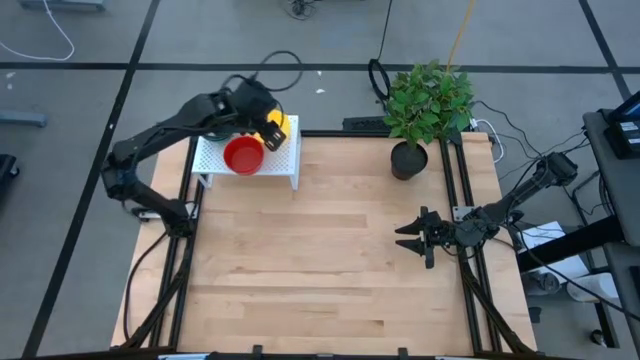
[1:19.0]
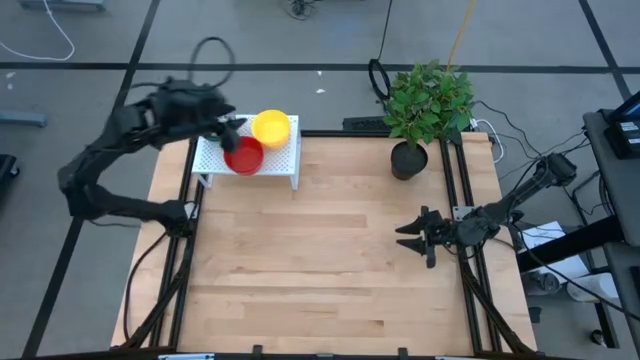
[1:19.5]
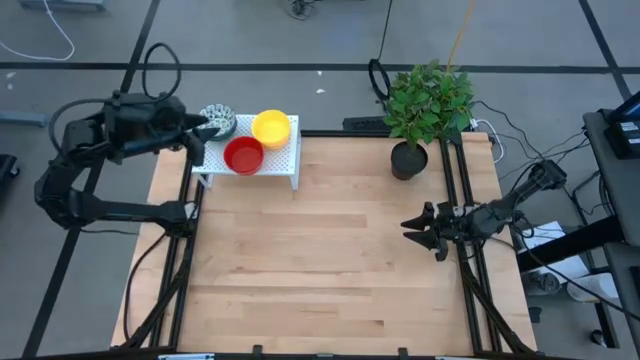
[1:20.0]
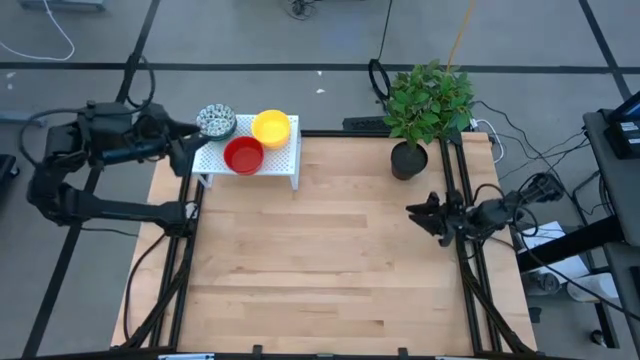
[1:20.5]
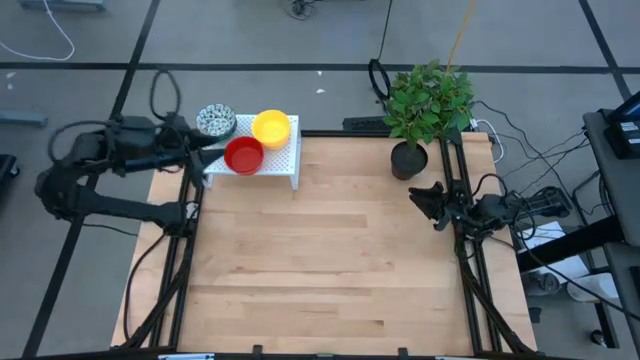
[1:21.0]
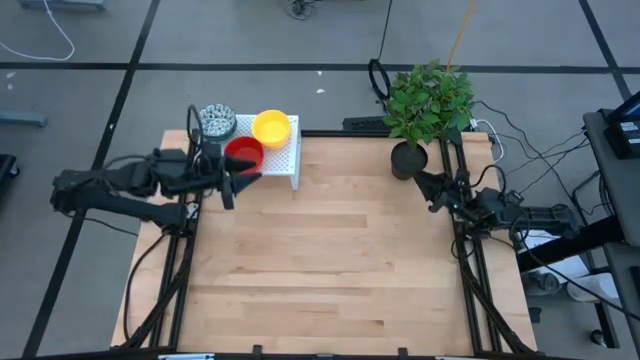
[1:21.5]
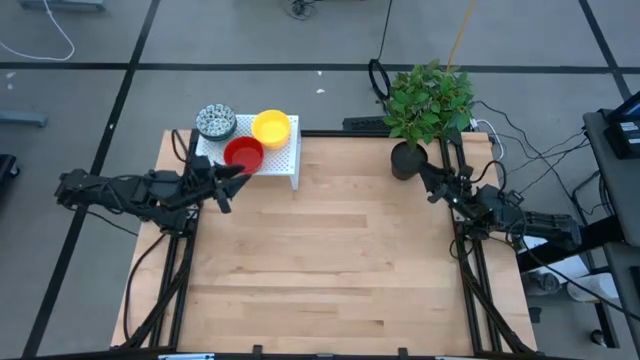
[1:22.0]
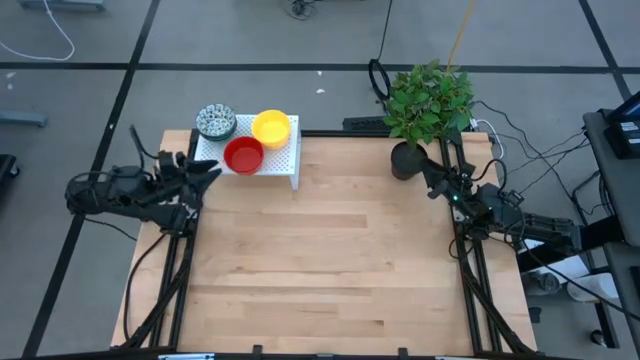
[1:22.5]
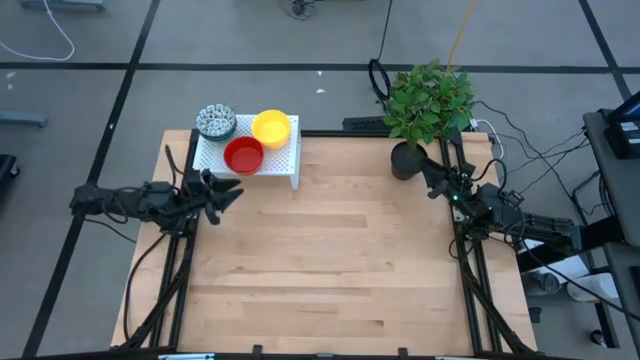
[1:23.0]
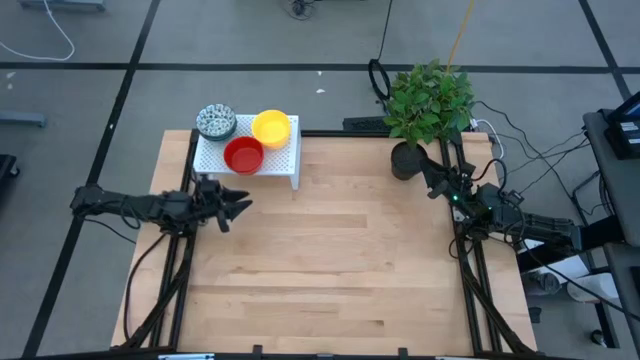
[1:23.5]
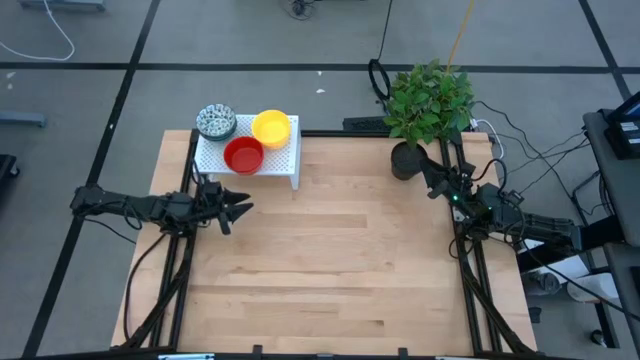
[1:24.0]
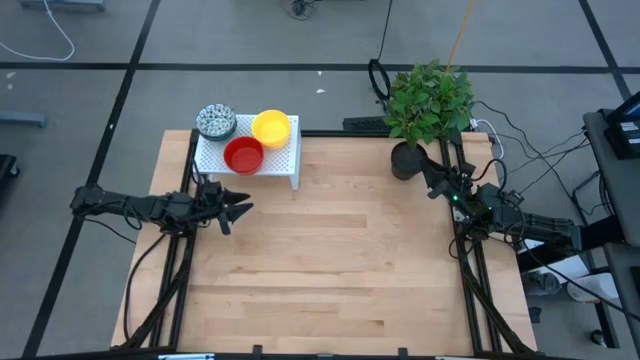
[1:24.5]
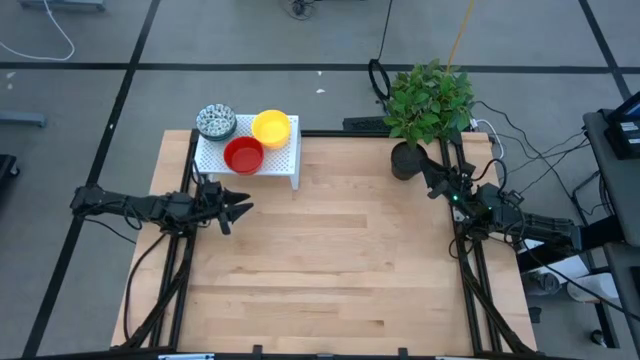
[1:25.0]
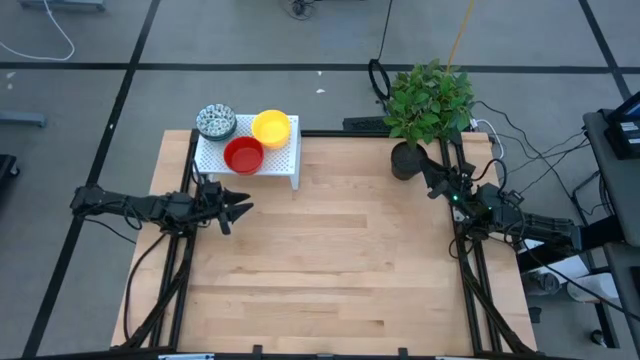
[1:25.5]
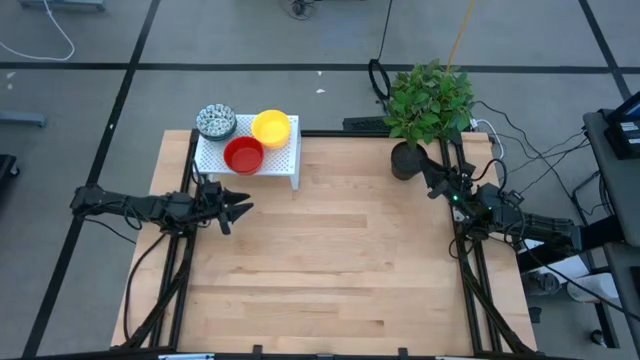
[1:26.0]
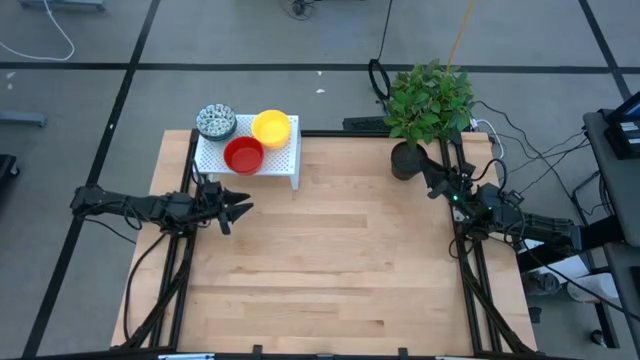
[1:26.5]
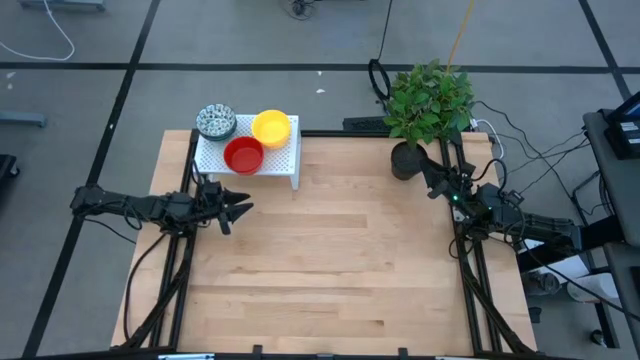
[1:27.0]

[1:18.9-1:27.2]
Task: Pick & Place Mini bowls
Return to Home Position

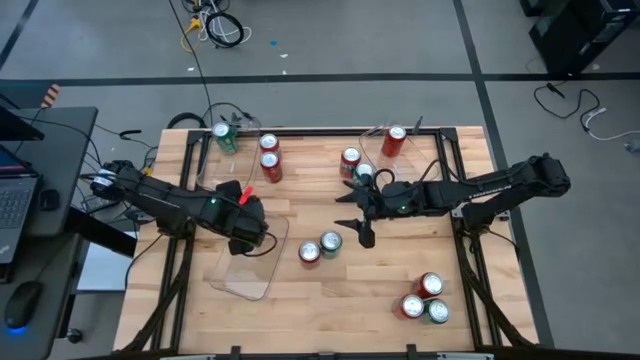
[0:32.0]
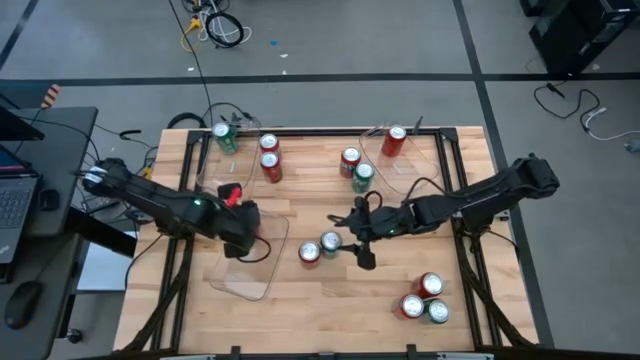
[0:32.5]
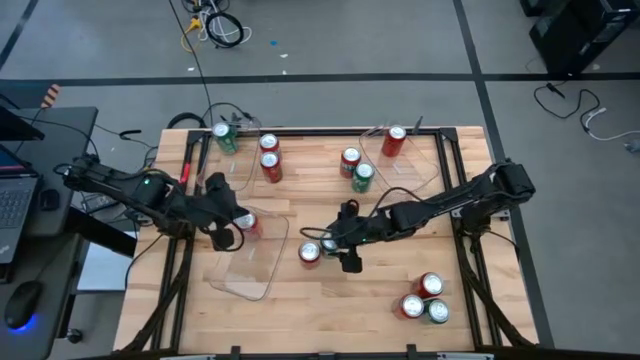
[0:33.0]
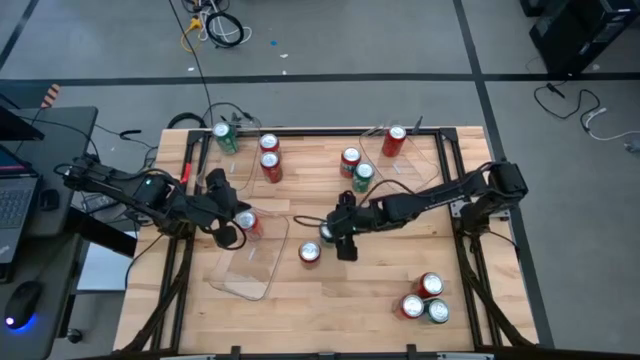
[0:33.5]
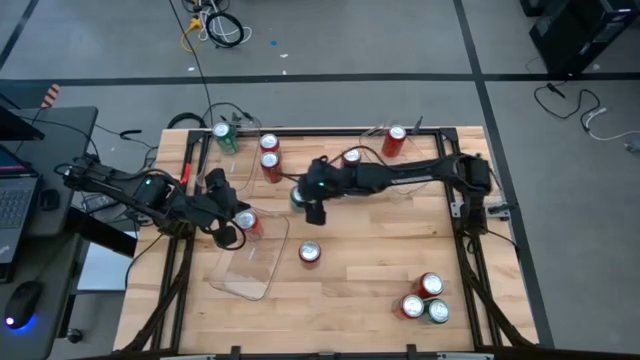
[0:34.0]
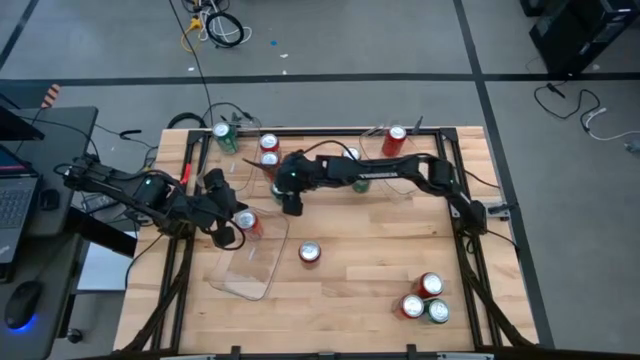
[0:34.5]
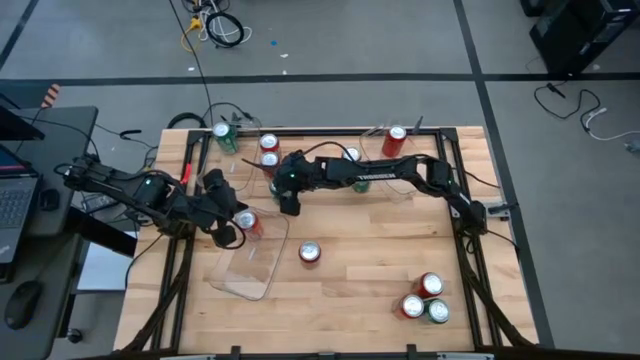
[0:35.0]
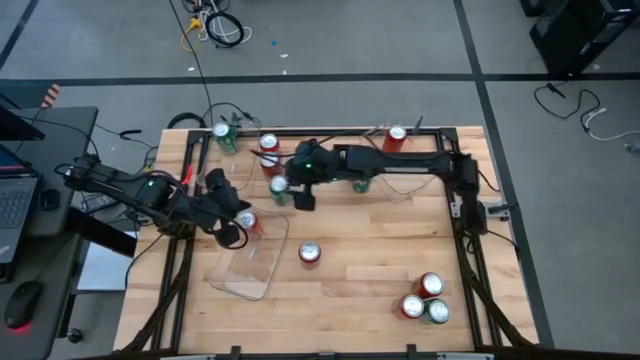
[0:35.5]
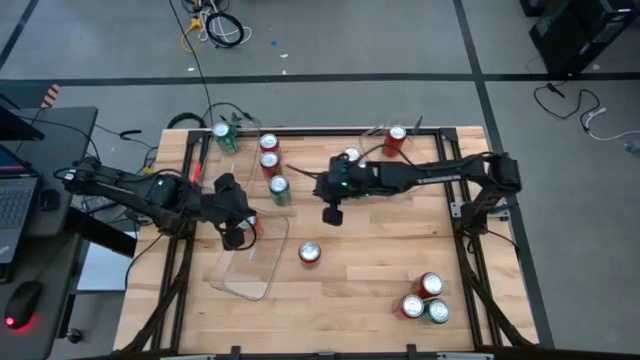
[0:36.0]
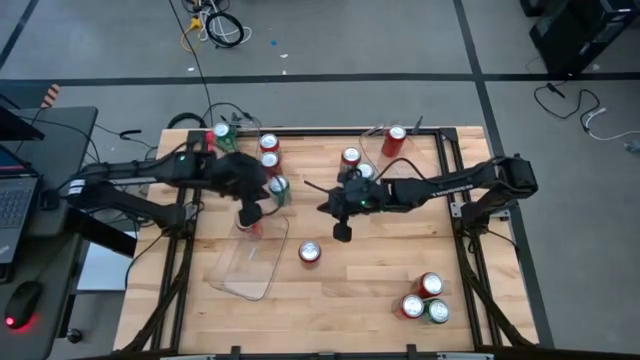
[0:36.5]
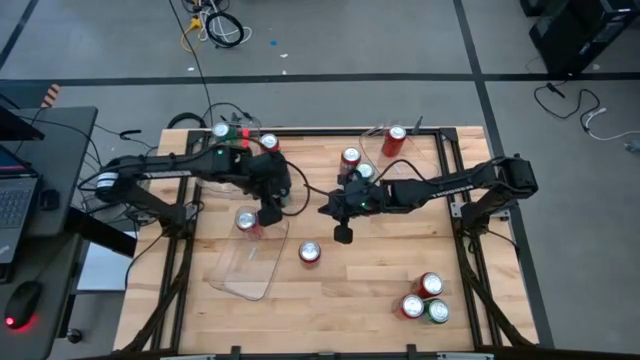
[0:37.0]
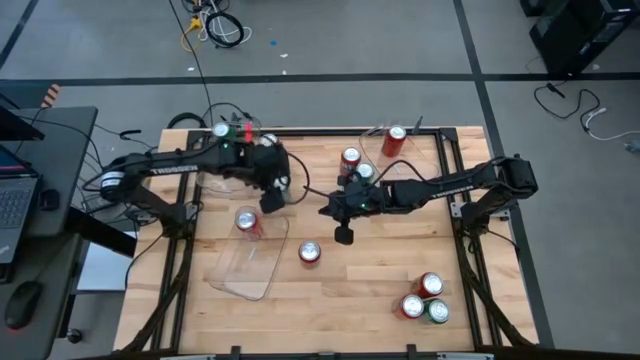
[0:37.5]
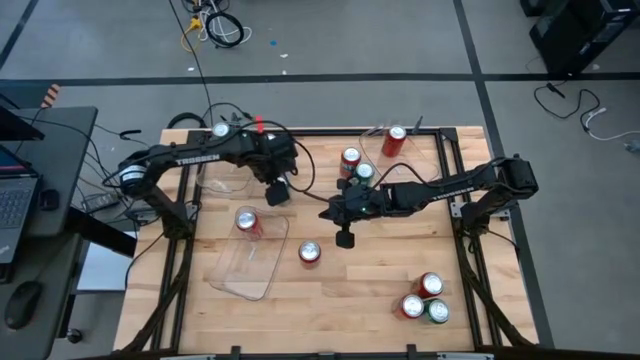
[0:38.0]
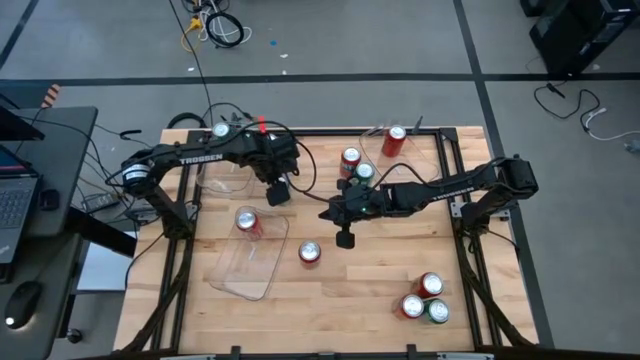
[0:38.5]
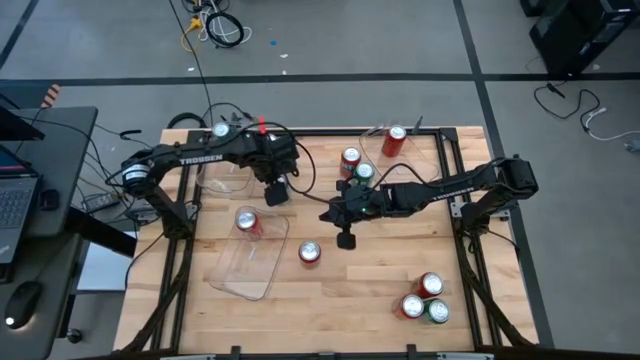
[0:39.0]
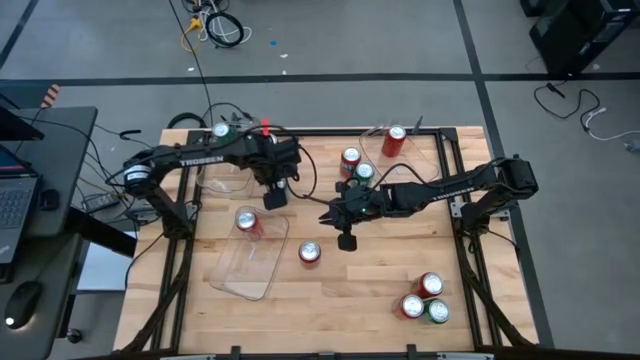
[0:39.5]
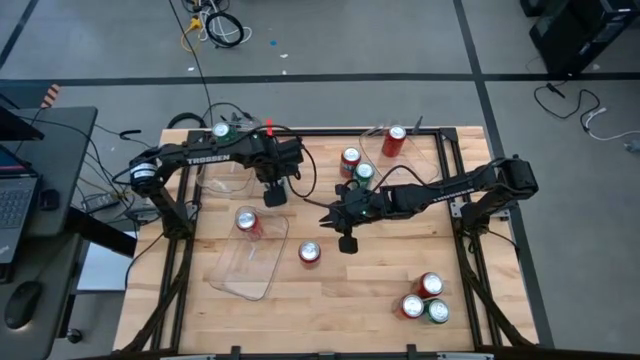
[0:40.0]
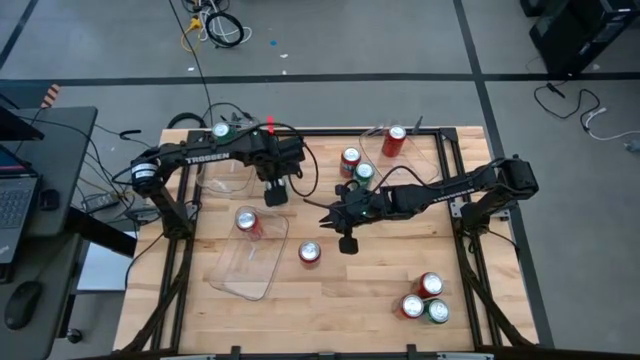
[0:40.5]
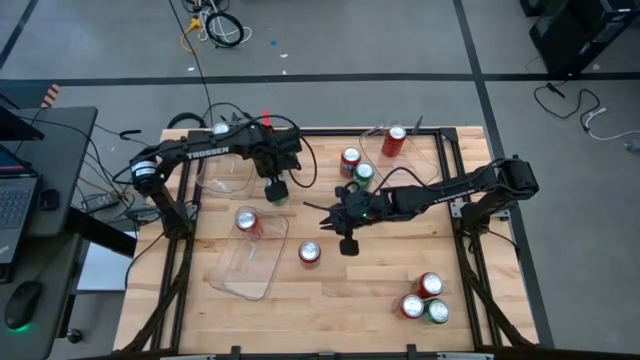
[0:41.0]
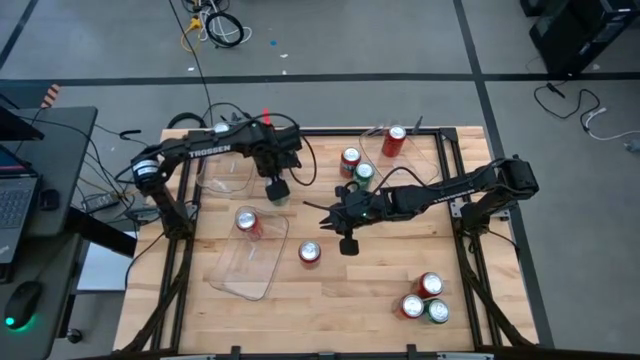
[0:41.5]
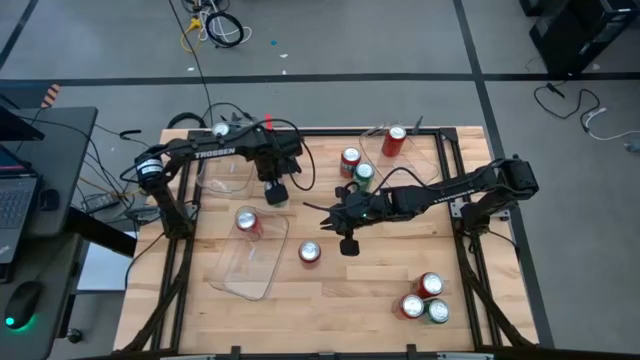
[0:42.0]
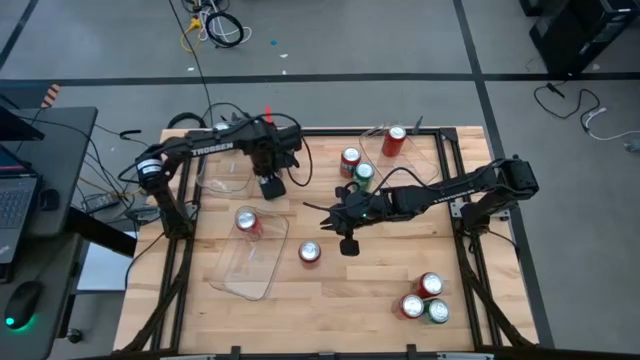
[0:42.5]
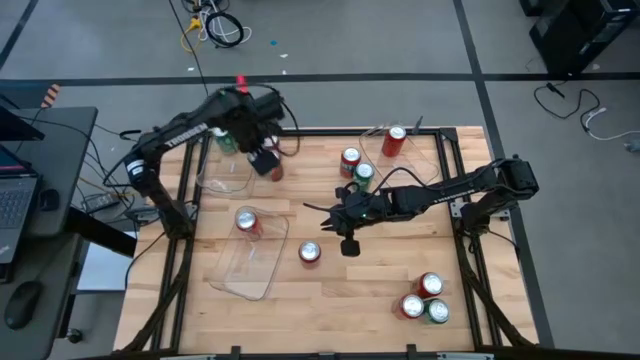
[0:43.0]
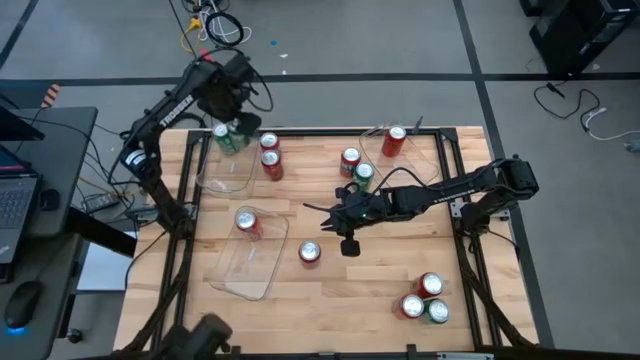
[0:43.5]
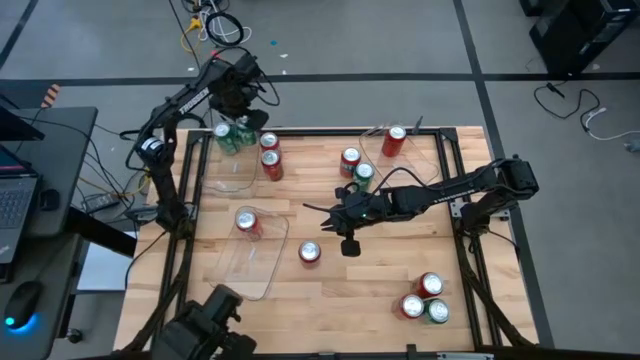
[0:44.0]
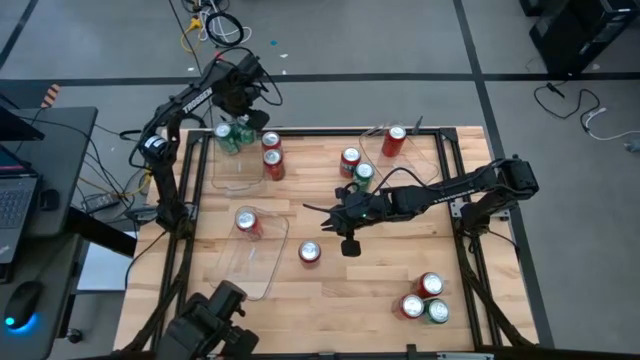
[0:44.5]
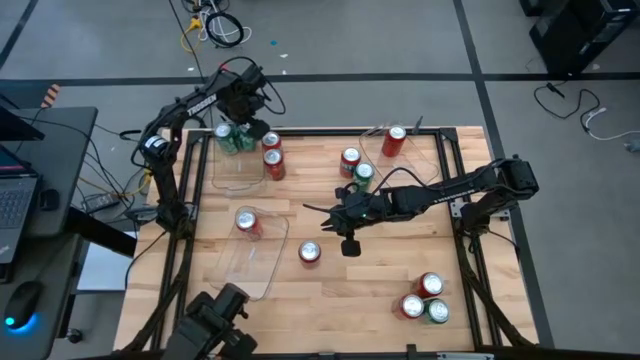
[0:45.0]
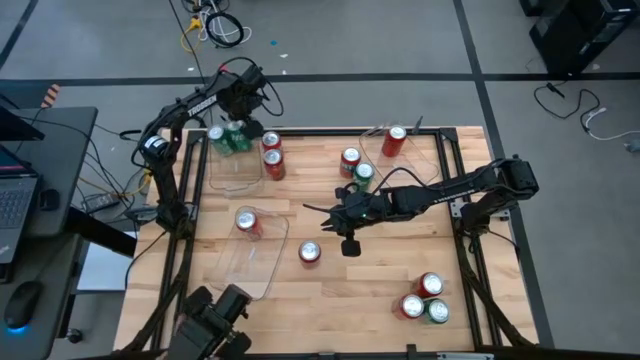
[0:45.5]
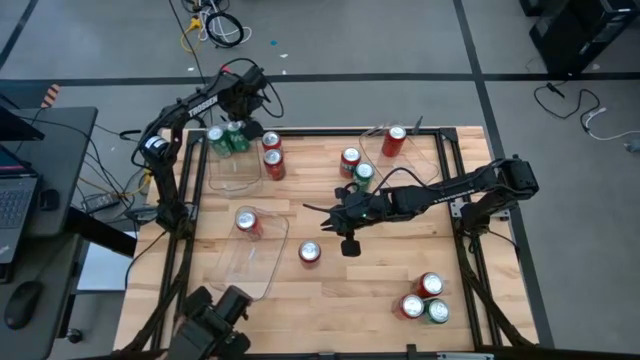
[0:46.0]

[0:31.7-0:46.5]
Task: Sort soda cans
Put the top middle soda can into the top left transparent bin
